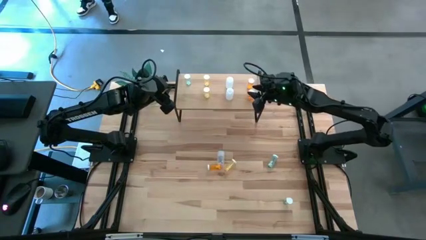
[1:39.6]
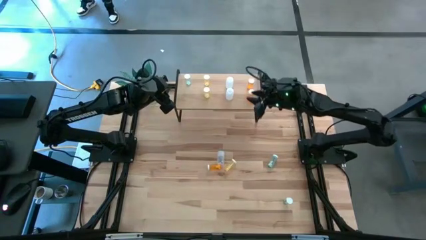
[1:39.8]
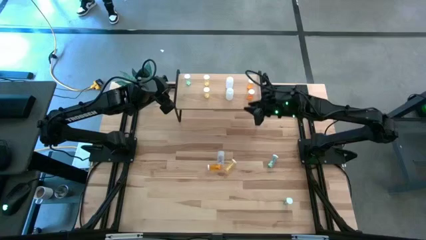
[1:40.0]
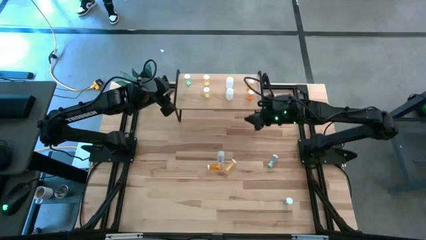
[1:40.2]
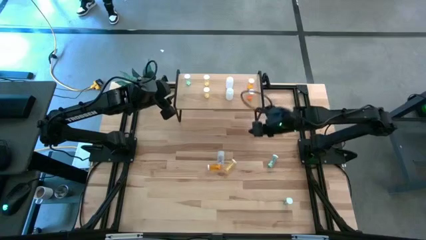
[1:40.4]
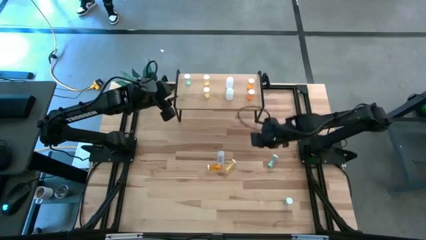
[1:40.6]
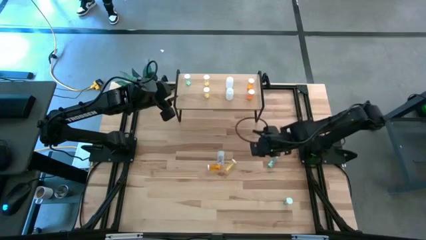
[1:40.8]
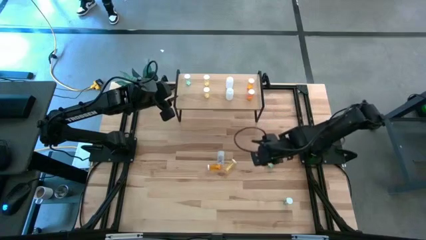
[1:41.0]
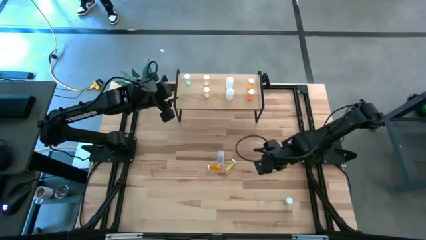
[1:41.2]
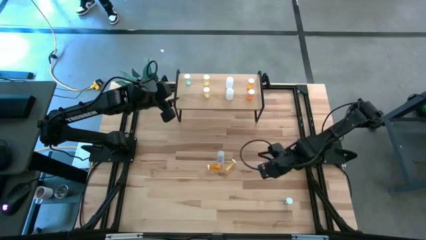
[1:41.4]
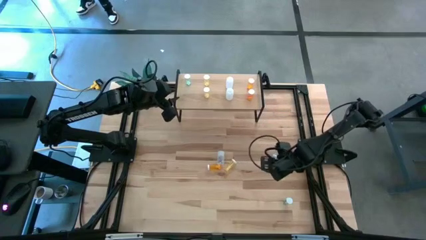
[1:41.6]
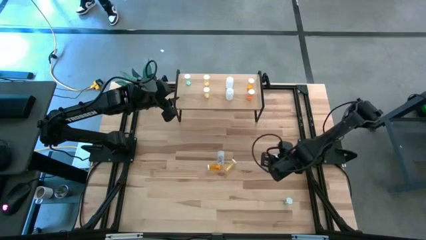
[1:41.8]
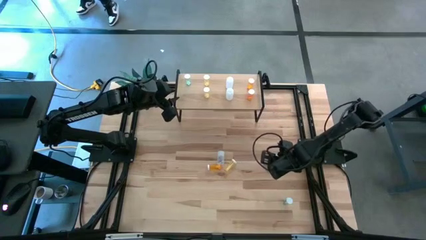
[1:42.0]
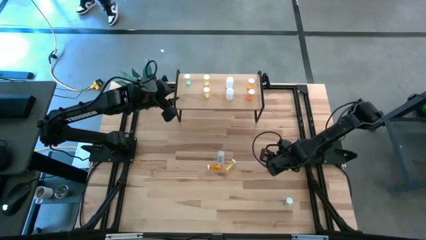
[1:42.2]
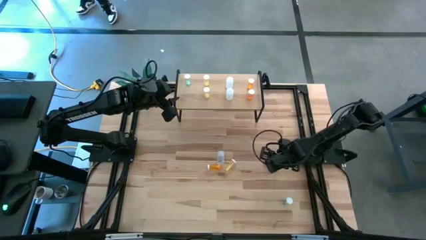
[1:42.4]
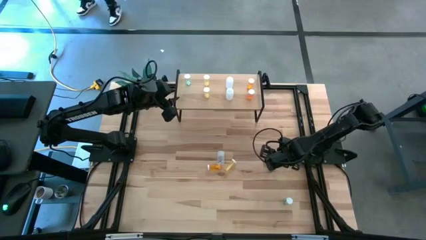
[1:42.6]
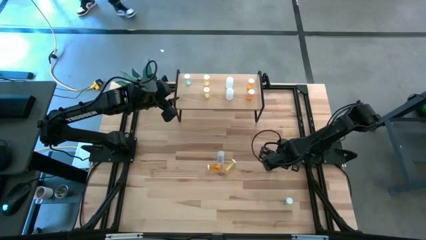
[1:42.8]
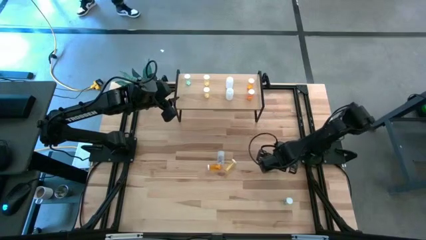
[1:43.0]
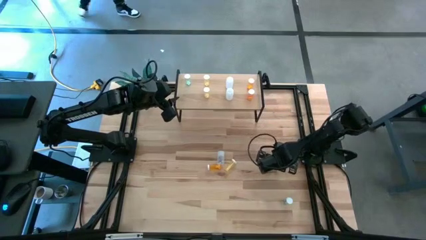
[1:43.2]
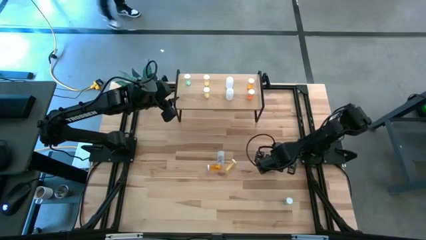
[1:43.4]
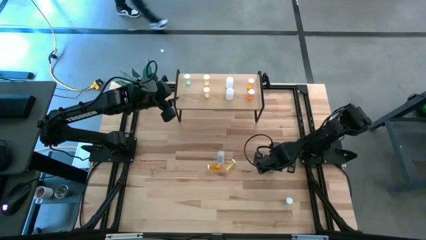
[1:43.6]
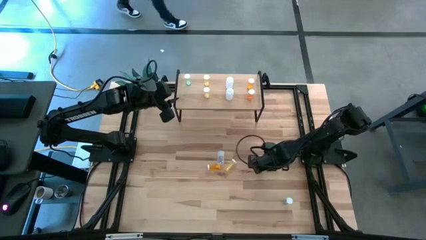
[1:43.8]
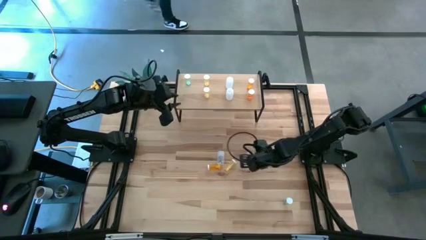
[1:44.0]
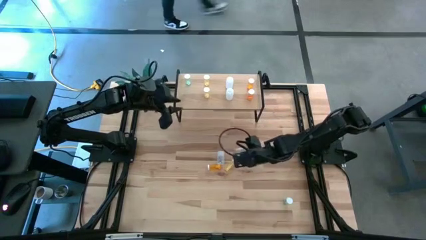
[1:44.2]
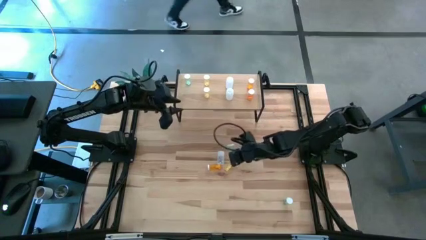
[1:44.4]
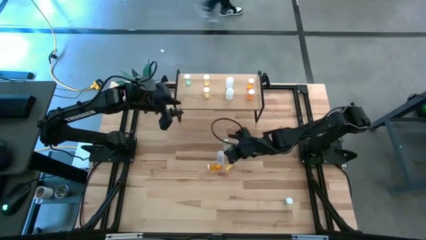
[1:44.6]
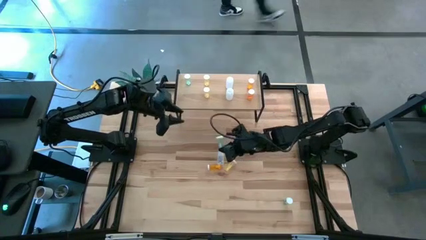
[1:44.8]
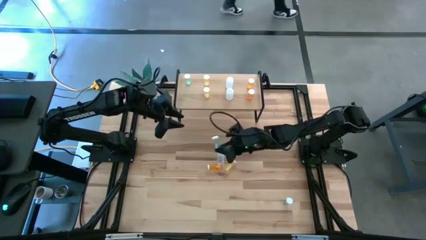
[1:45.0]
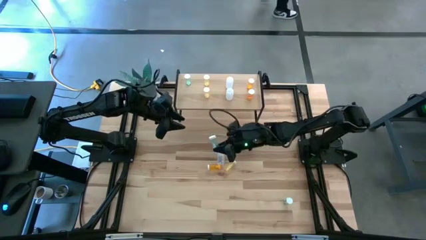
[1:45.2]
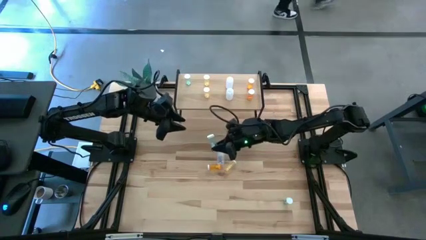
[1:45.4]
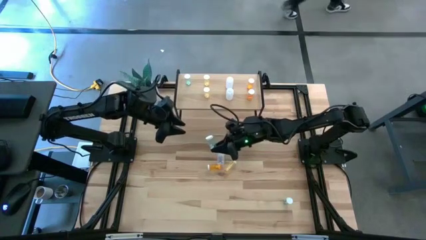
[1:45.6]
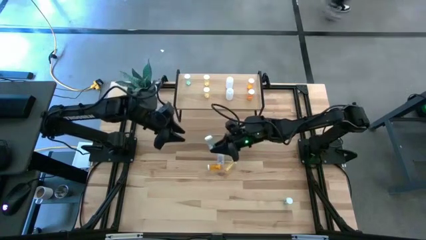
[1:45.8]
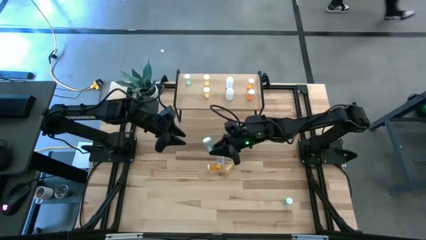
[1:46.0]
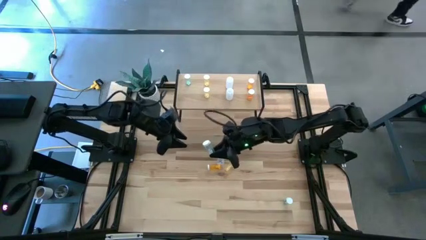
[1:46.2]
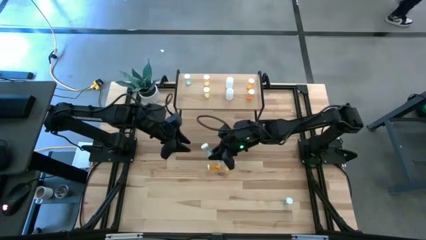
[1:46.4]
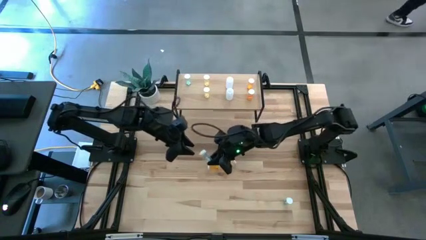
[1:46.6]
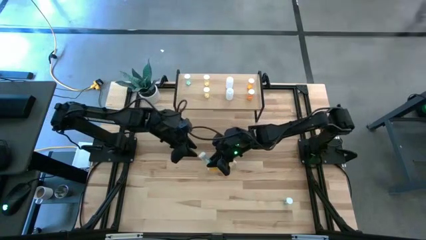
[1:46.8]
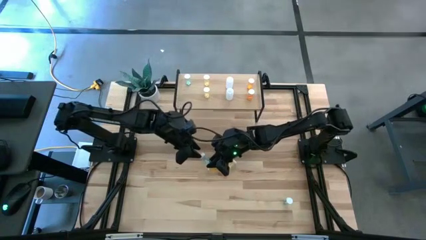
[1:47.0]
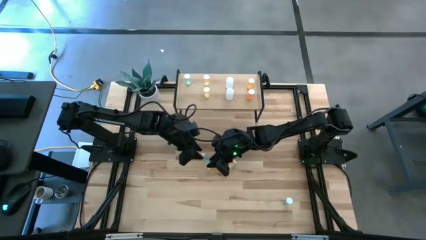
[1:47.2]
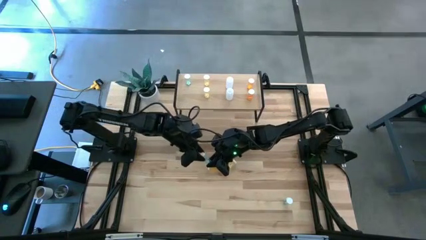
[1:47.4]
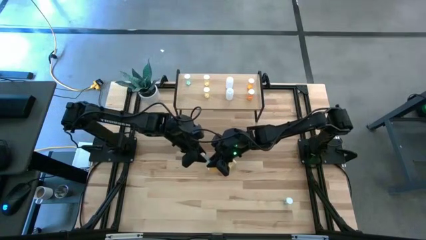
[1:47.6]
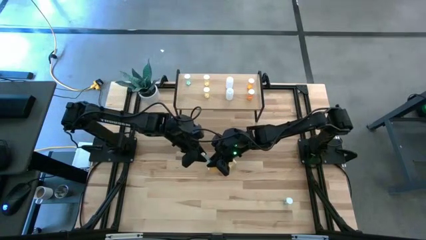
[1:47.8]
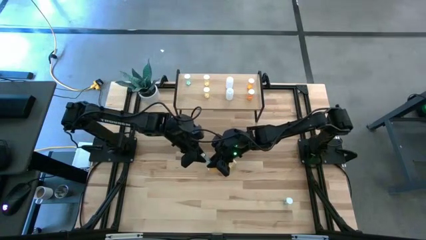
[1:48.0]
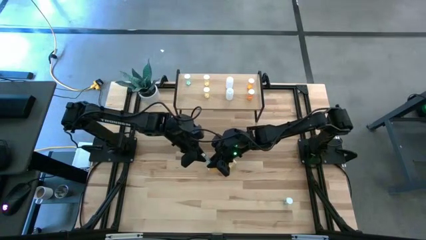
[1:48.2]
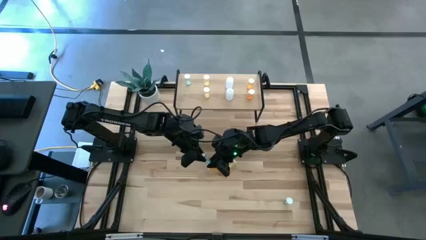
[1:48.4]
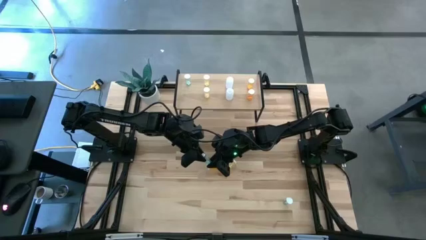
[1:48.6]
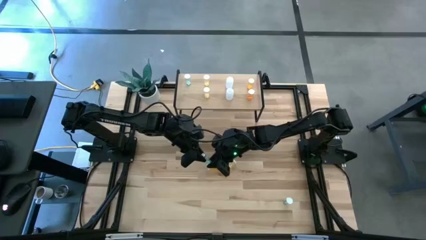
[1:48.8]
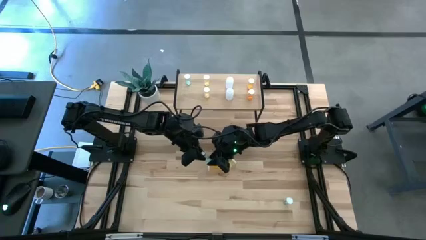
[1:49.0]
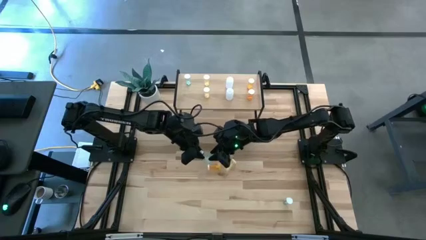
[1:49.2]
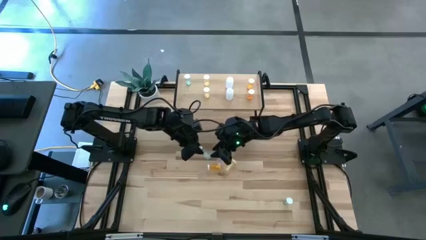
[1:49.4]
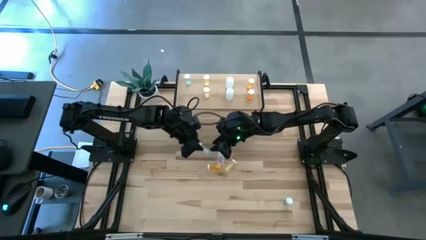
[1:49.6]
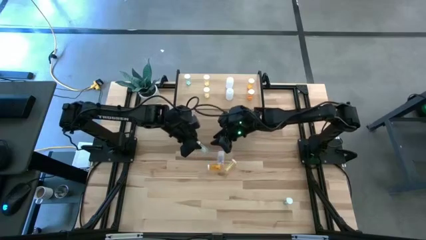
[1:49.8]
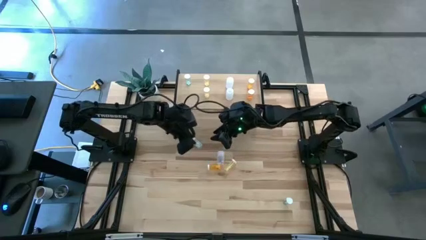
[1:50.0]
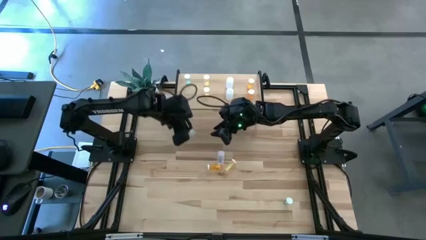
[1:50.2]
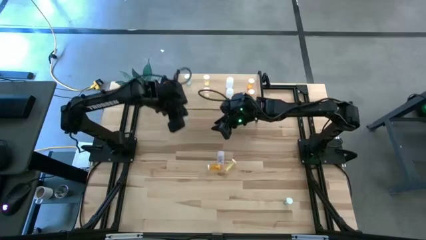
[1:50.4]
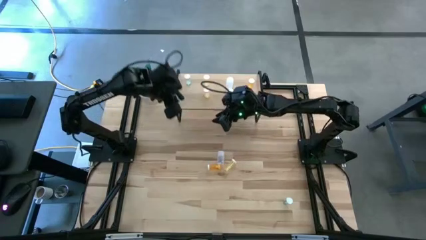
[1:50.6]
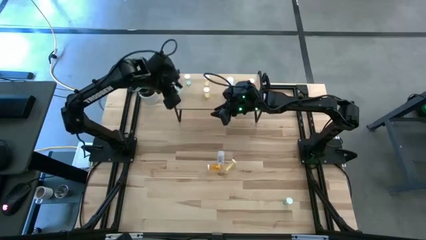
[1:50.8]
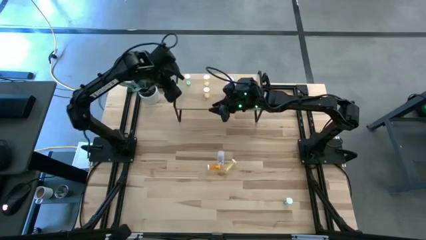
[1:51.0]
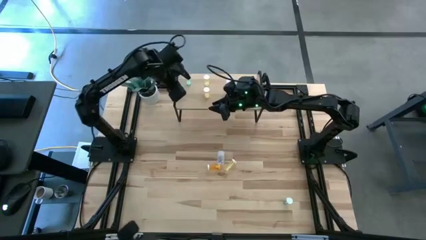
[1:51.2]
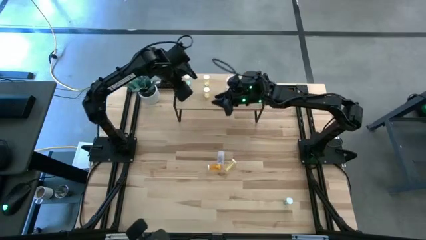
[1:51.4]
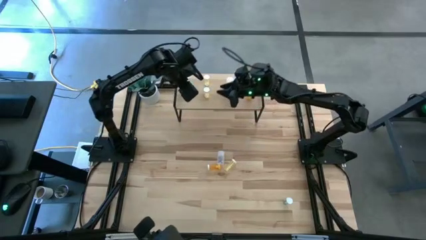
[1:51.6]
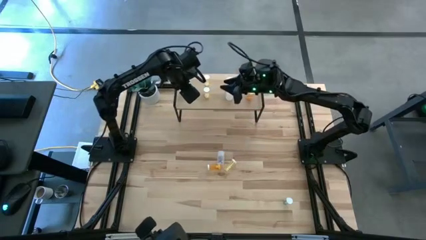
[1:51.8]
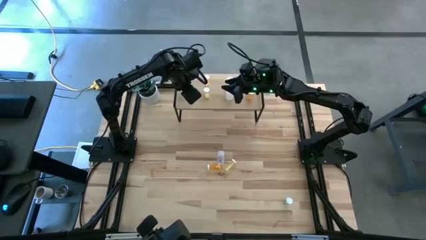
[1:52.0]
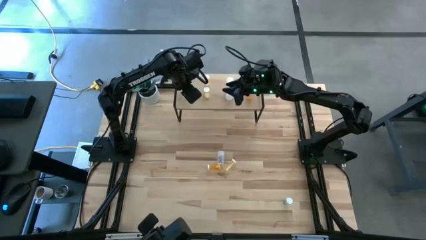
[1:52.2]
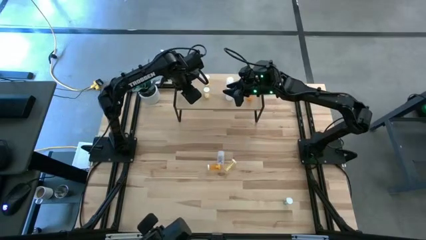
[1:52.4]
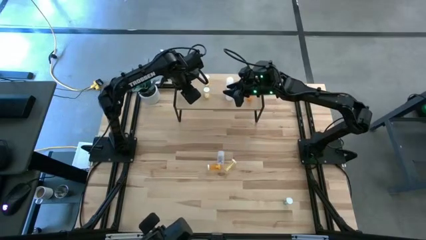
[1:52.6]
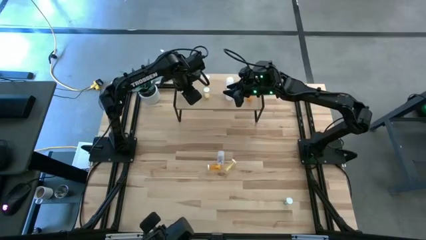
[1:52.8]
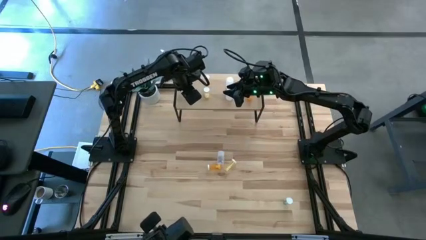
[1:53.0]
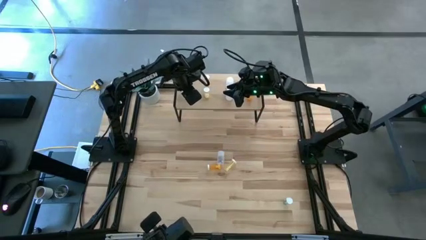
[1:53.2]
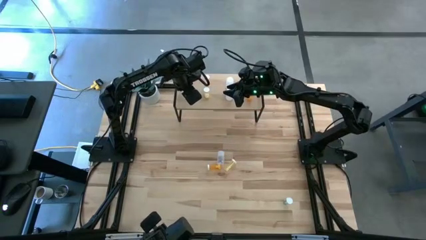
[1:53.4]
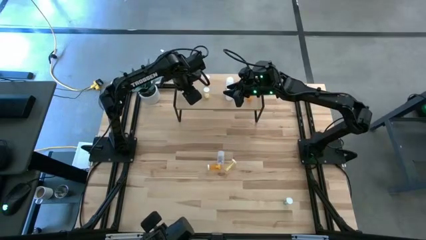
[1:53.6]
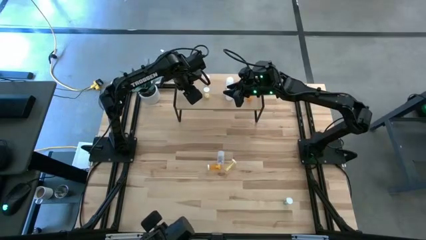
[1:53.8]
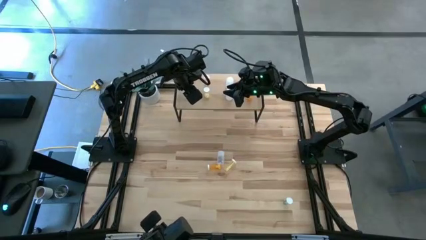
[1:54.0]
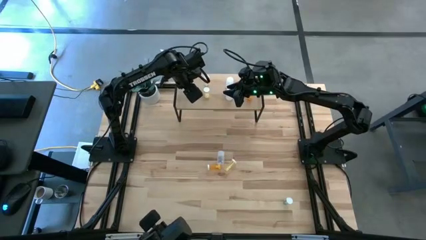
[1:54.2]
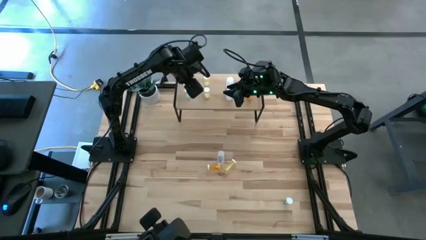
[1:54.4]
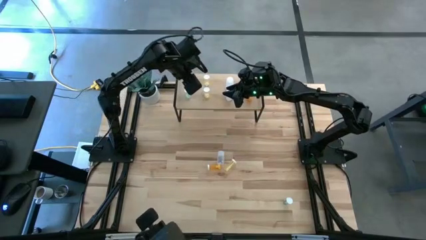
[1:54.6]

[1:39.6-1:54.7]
Task: Pick and place medicine bottles onto shelf by color
Put the top right blue pill bottle aligned with the other blue pill bottle on the shelf
